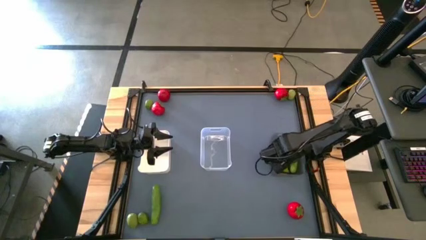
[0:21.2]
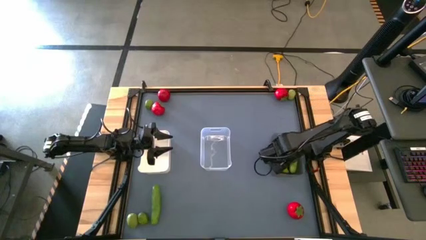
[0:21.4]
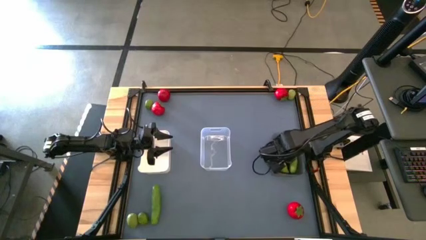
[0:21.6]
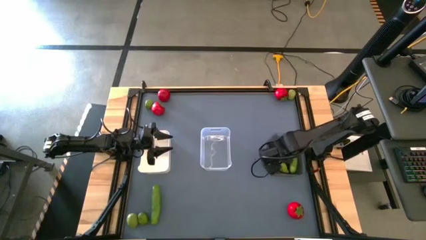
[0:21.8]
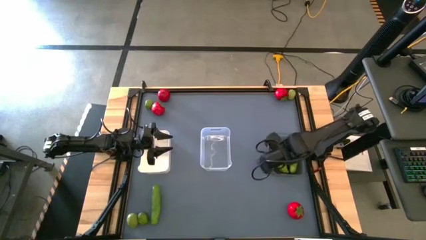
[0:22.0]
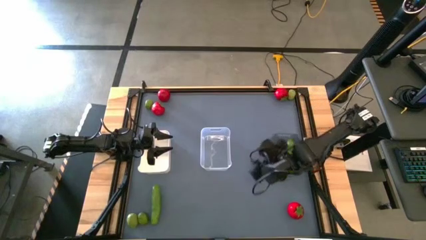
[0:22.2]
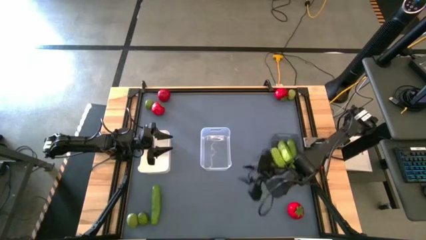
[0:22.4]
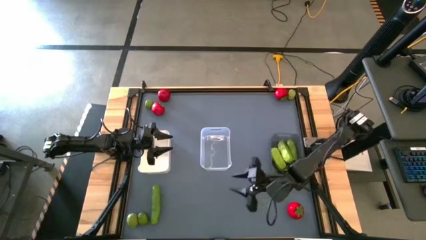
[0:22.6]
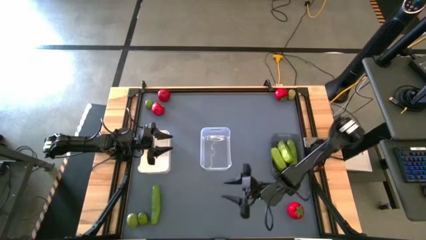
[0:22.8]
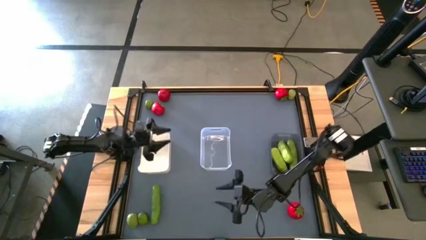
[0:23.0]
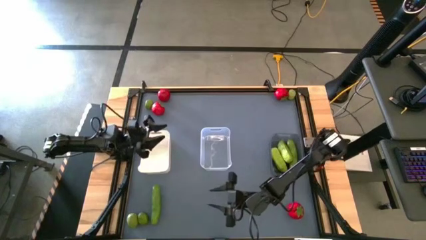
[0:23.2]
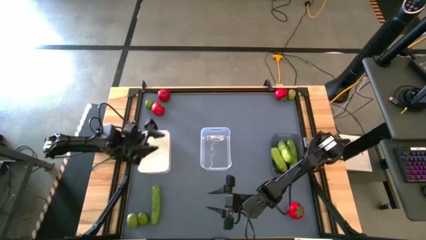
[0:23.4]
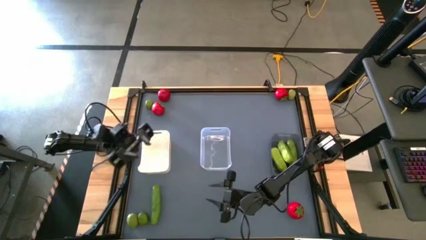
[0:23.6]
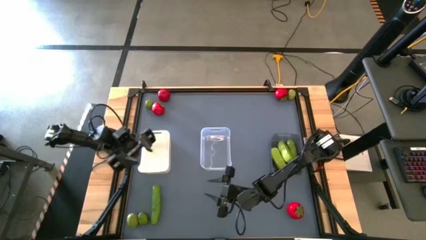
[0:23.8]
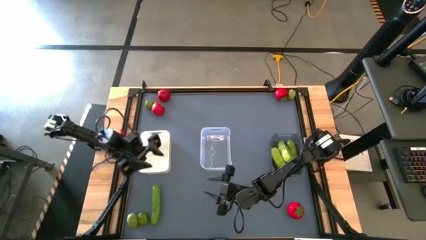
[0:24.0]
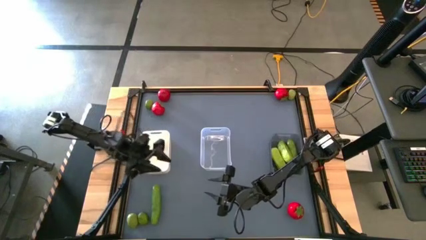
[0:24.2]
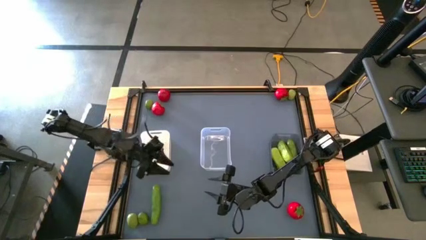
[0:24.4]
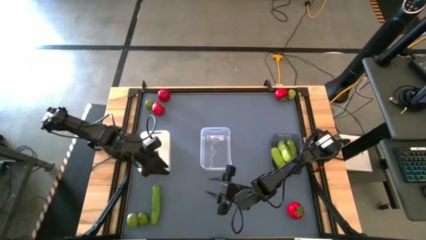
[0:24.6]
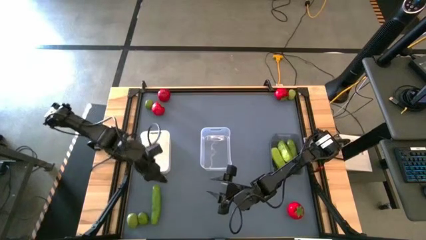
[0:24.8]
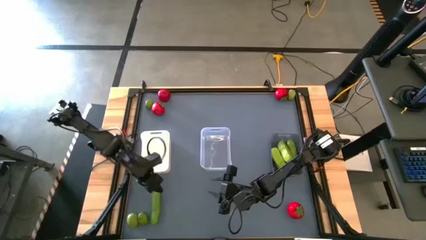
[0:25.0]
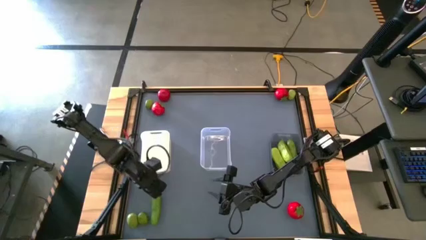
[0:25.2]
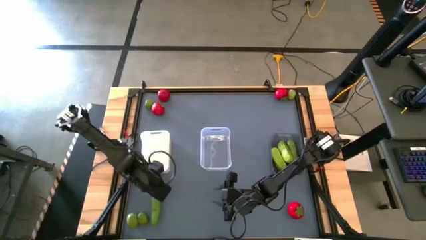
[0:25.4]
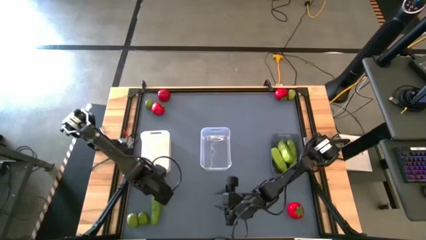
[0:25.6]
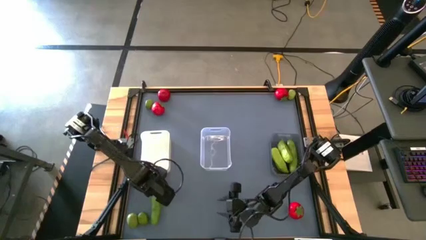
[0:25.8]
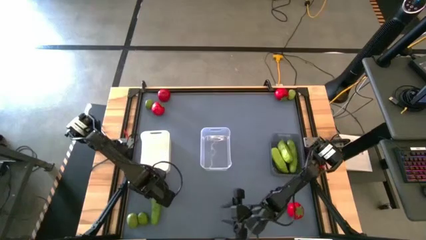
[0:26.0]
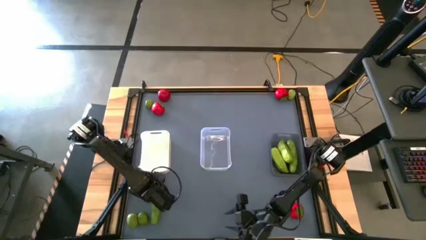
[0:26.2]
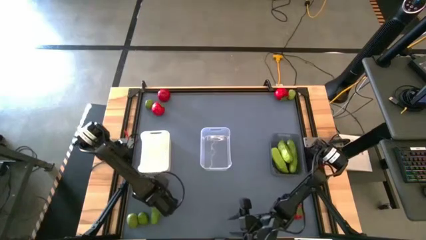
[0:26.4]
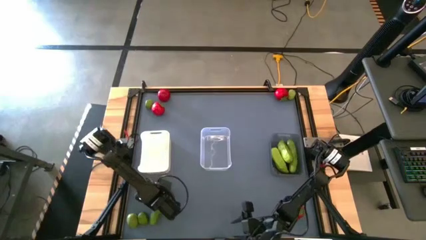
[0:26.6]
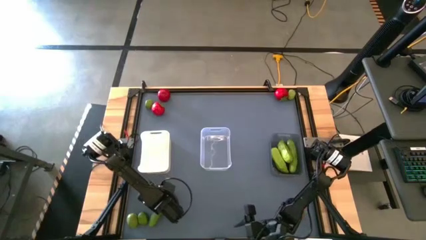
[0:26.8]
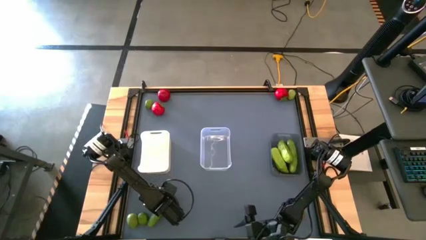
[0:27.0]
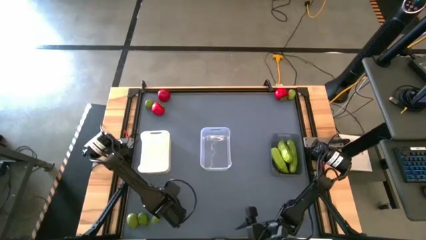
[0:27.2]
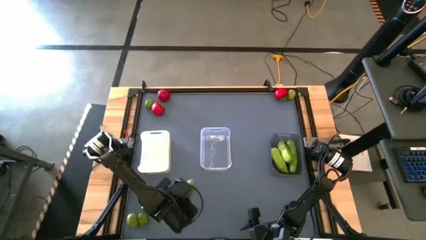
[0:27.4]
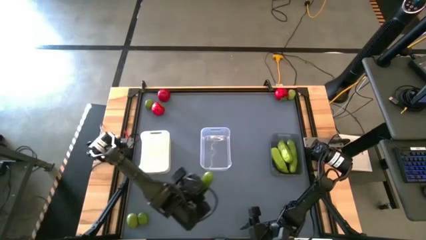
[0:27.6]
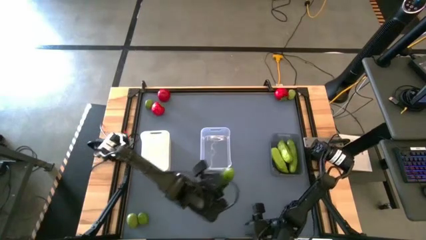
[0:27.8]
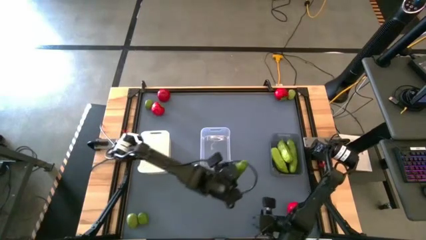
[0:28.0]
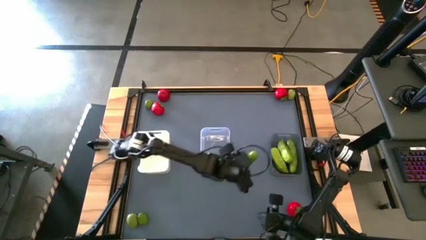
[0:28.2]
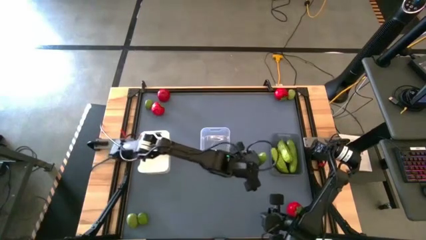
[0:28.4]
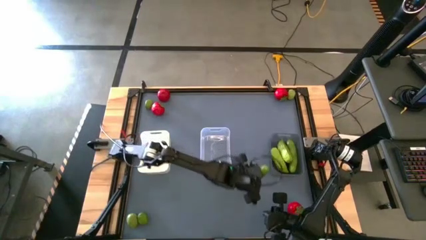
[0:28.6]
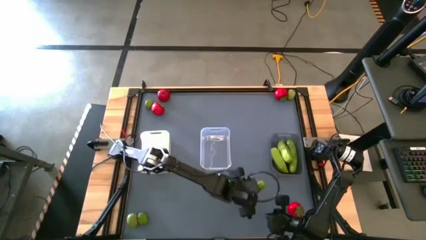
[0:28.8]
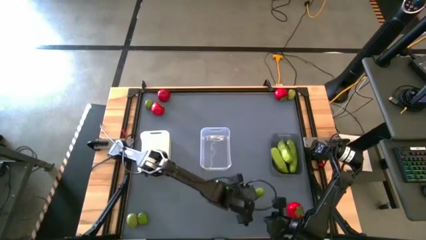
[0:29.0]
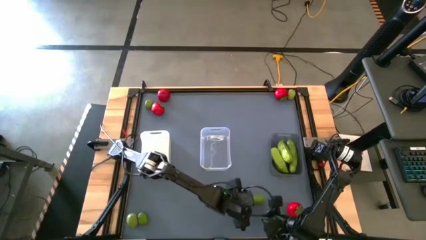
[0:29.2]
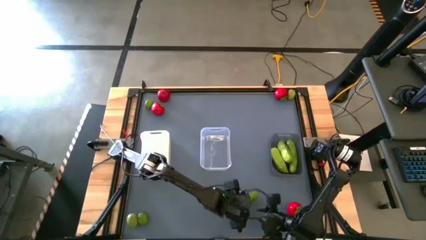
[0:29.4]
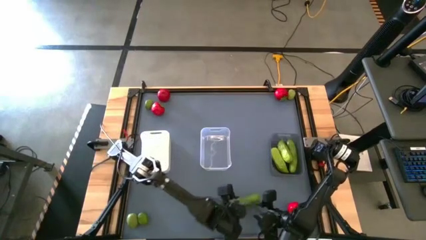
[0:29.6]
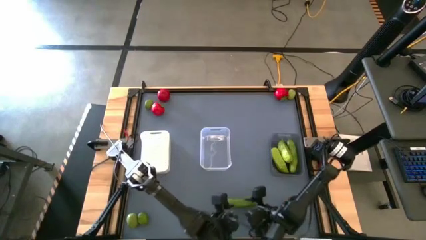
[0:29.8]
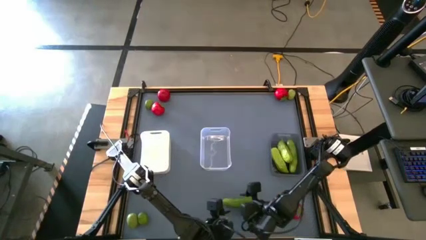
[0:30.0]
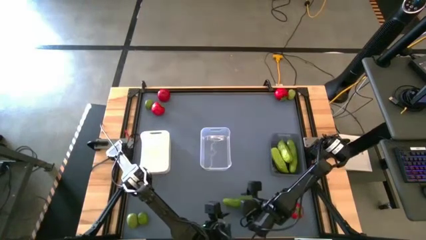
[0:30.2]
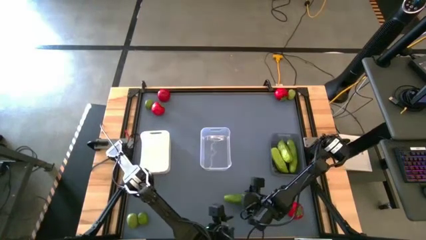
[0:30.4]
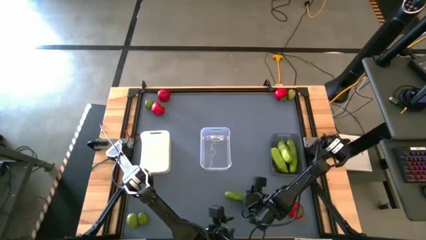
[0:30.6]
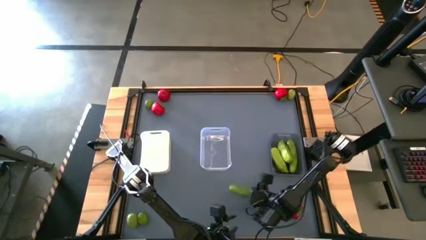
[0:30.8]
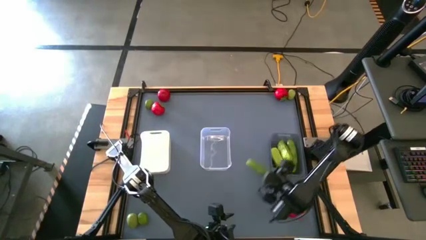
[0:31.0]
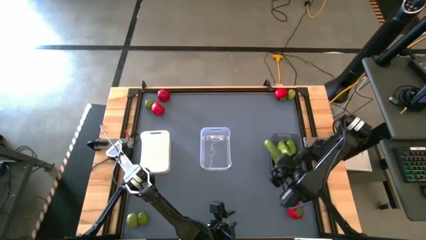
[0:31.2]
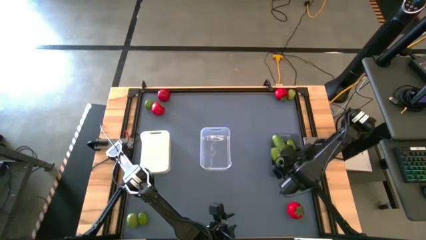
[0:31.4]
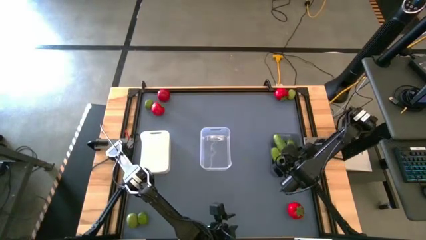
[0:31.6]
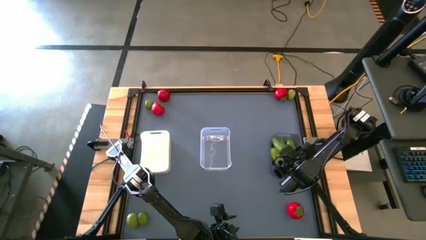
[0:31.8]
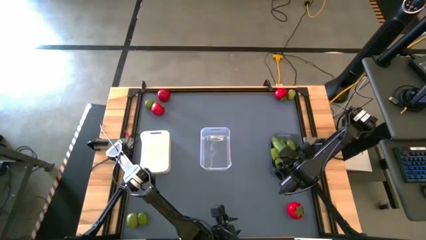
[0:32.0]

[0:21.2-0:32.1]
Task: Sort produce into baskets
Put the green cucumber into the black bin

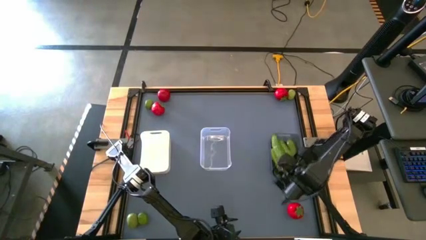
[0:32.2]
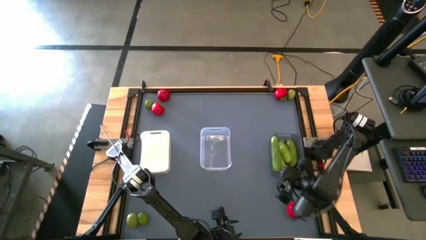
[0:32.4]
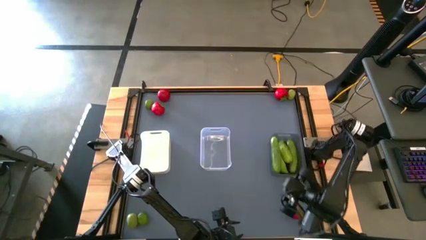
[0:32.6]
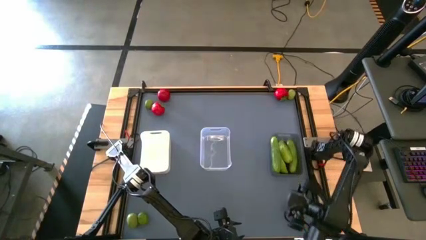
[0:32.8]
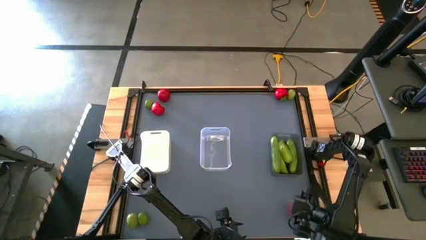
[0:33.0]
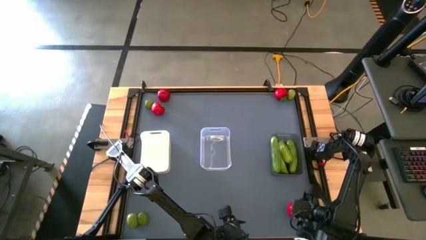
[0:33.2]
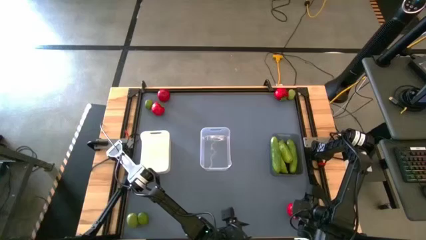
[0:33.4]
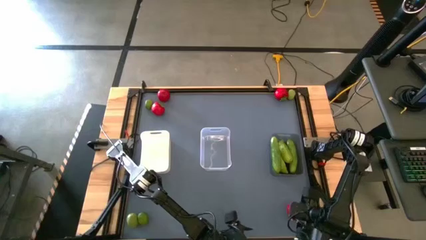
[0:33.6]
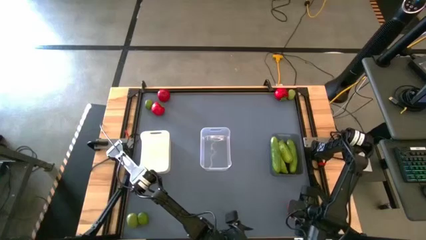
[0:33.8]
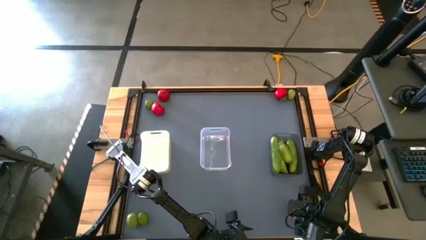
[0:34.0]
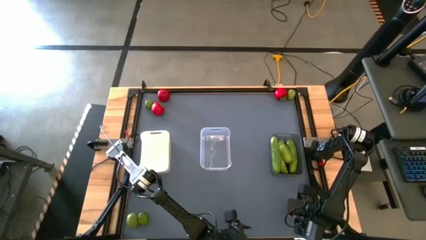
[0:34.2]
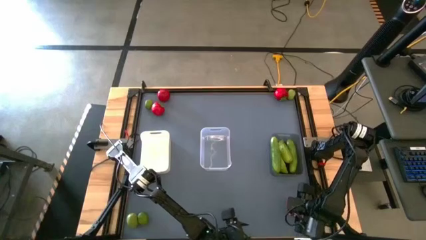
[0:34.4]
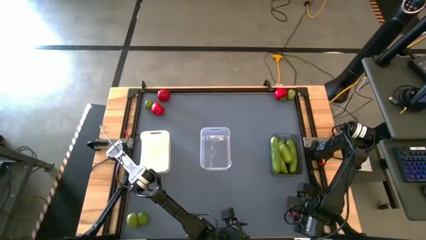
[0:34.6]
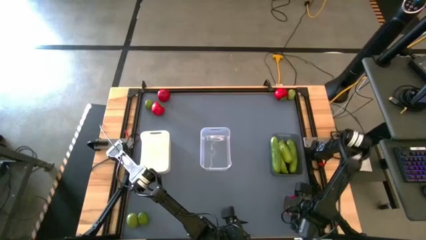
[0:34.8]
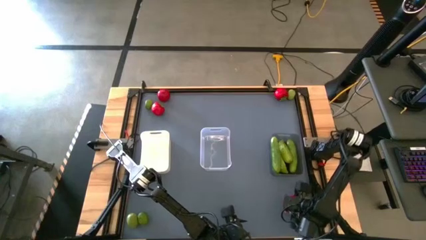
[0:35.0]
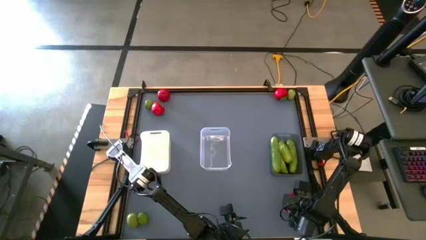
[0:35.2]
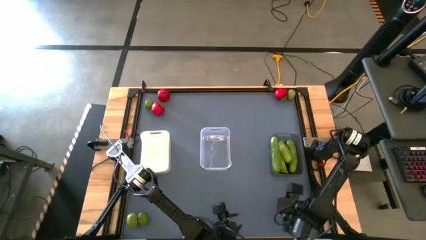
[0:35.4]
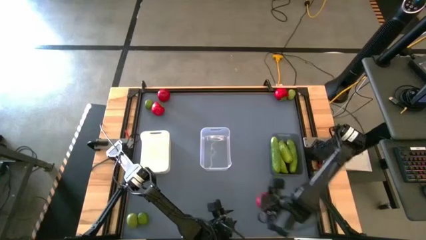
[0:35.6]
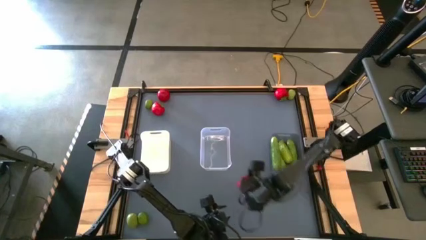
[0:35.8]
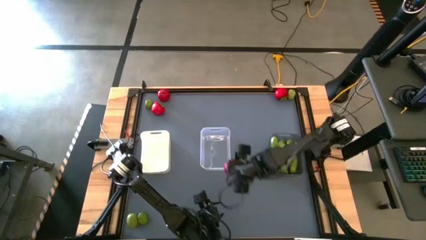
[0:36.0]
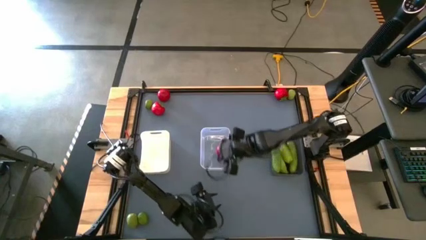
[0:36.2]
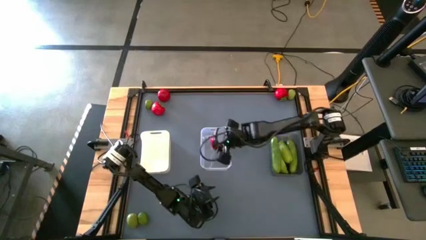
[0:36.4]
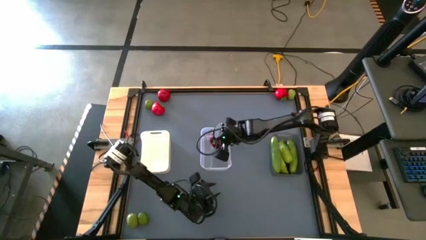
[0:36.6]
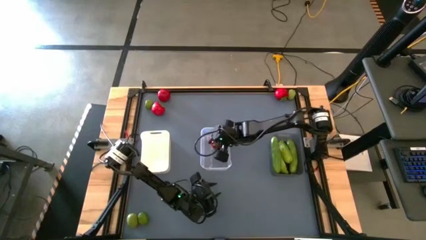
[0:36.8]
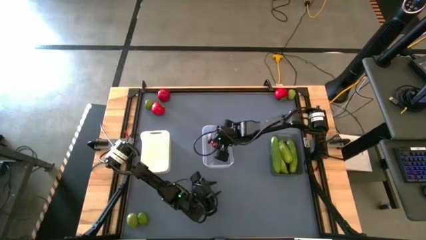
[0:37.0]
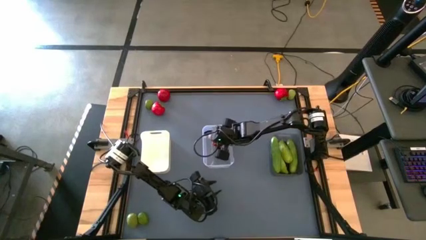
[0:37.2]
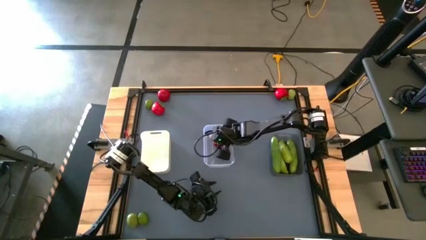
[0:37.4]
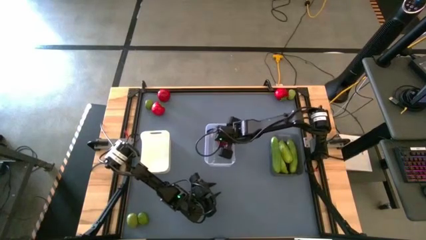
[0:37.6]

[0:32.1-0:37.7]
Put the red tomato into the transparent bin
